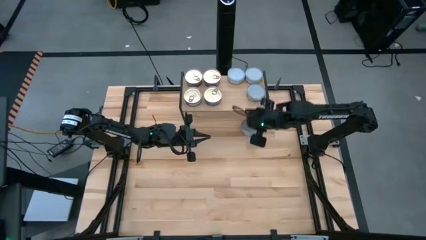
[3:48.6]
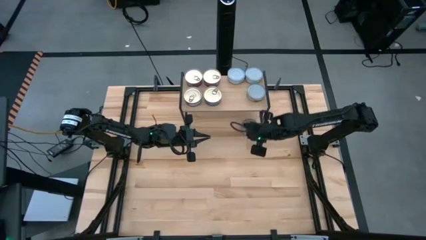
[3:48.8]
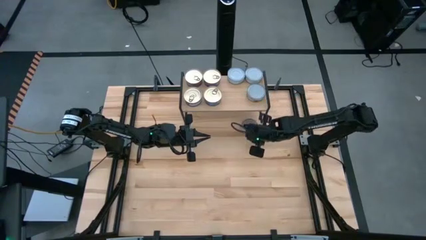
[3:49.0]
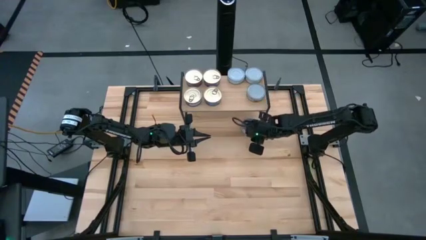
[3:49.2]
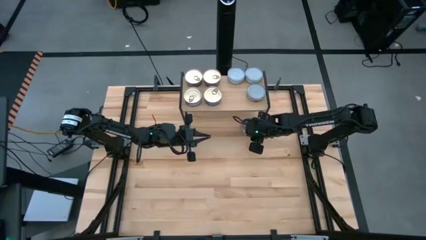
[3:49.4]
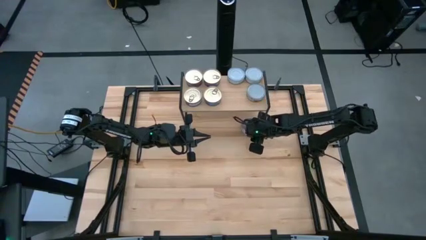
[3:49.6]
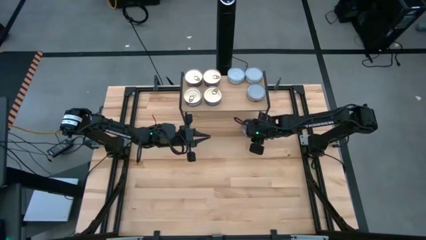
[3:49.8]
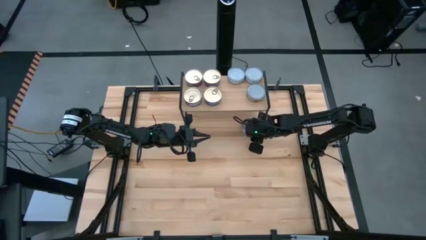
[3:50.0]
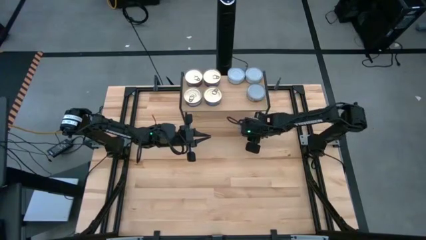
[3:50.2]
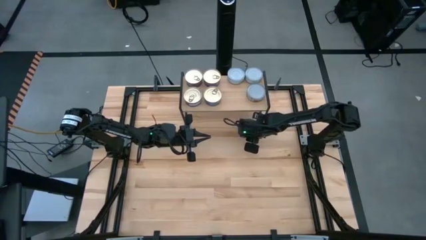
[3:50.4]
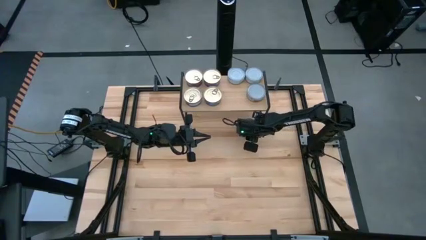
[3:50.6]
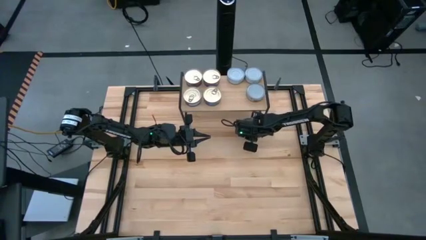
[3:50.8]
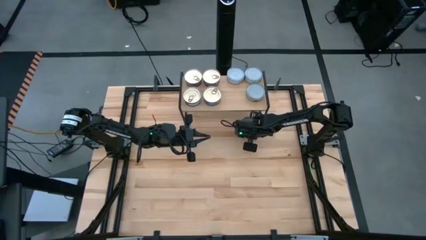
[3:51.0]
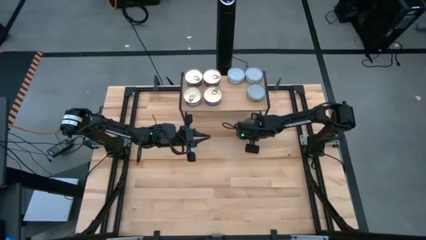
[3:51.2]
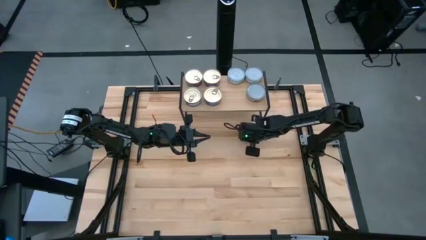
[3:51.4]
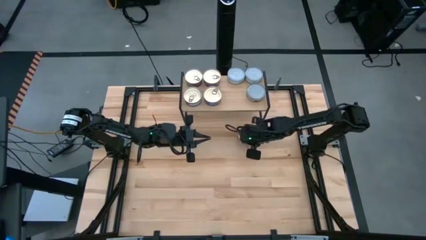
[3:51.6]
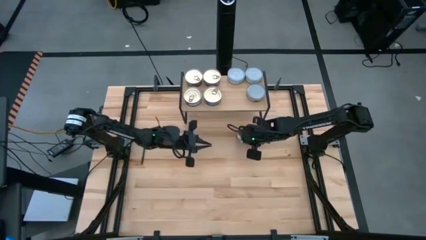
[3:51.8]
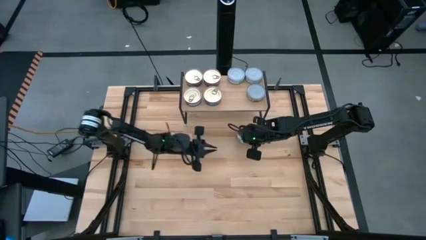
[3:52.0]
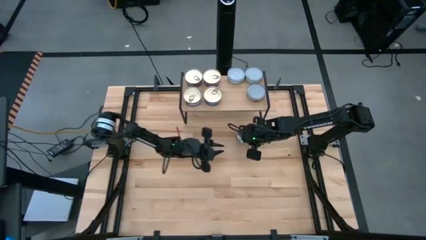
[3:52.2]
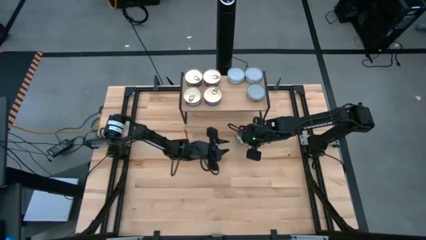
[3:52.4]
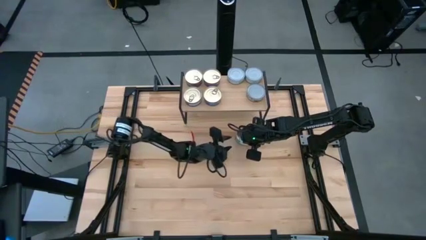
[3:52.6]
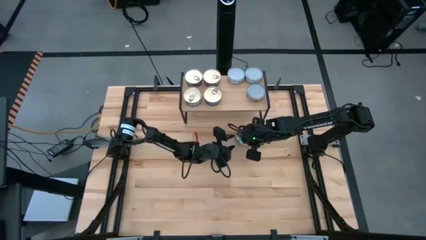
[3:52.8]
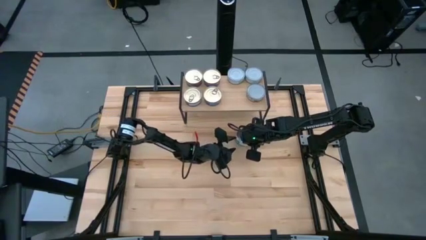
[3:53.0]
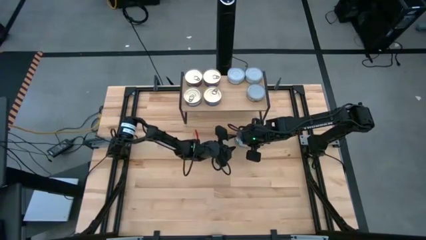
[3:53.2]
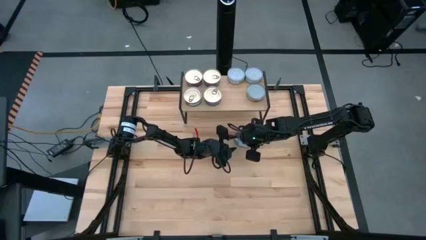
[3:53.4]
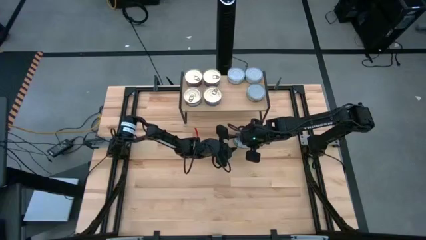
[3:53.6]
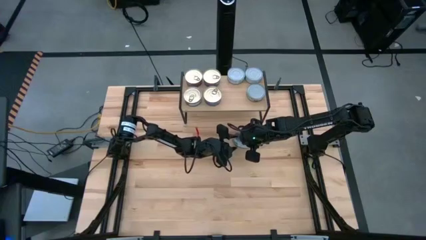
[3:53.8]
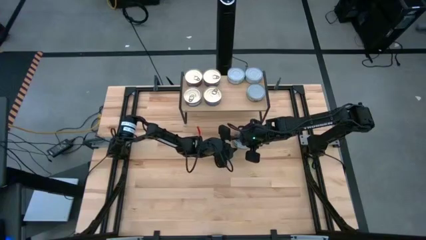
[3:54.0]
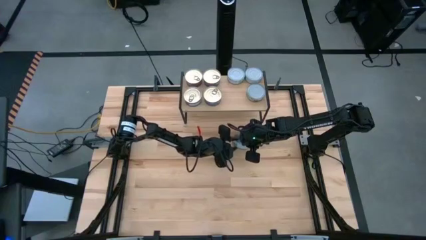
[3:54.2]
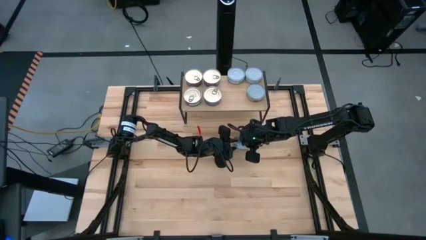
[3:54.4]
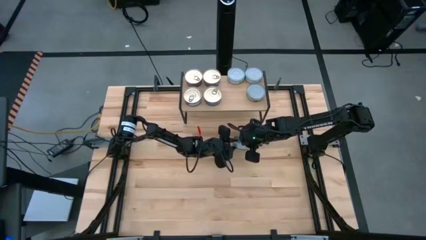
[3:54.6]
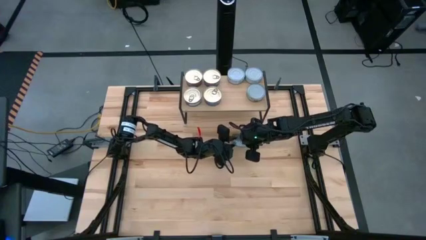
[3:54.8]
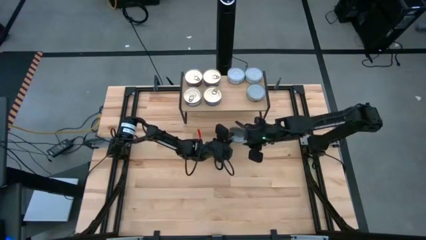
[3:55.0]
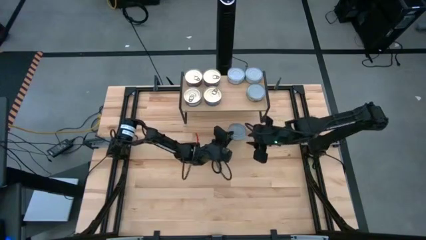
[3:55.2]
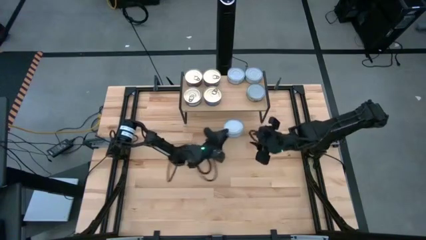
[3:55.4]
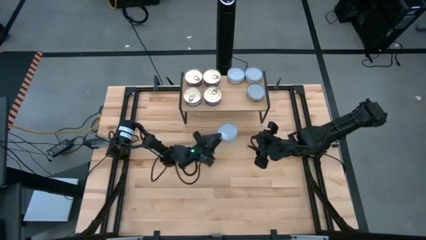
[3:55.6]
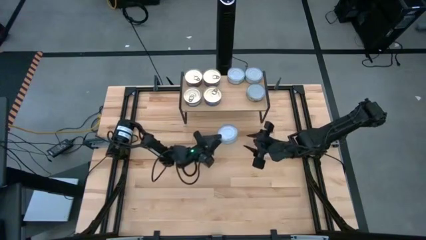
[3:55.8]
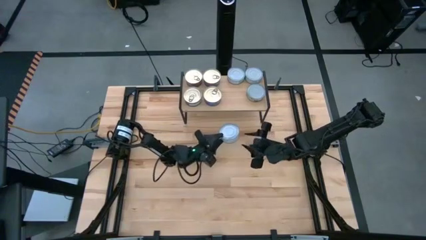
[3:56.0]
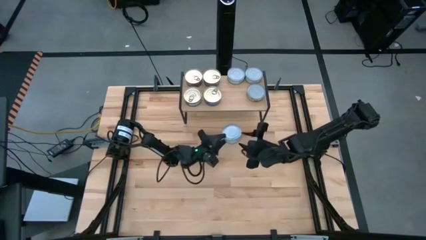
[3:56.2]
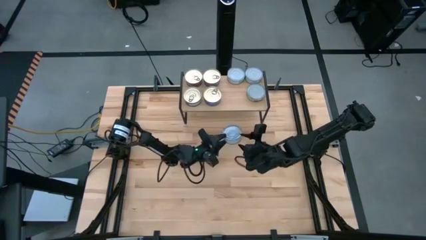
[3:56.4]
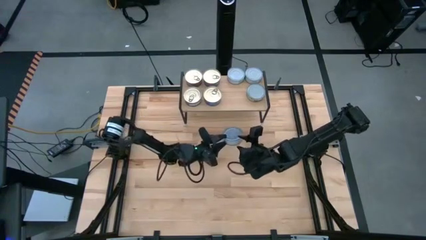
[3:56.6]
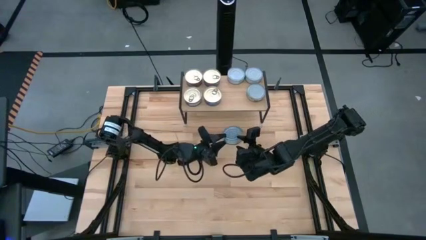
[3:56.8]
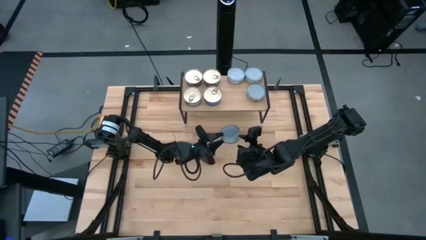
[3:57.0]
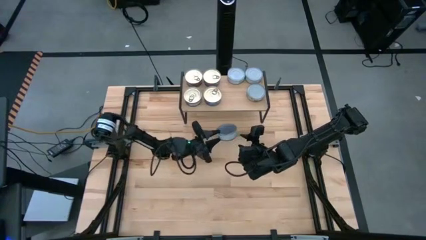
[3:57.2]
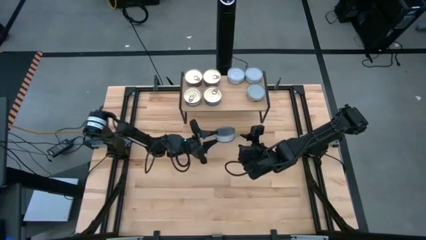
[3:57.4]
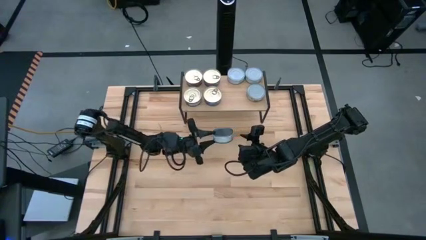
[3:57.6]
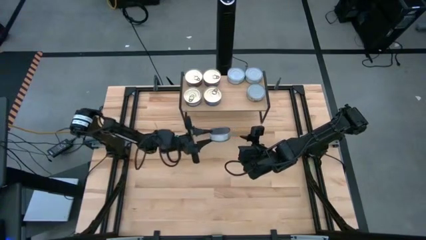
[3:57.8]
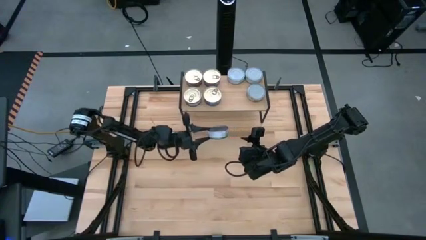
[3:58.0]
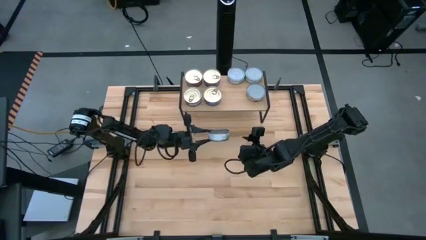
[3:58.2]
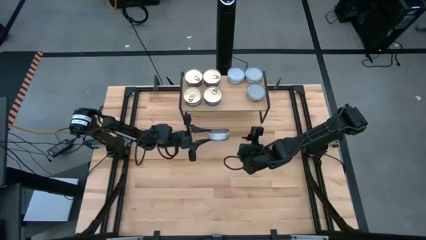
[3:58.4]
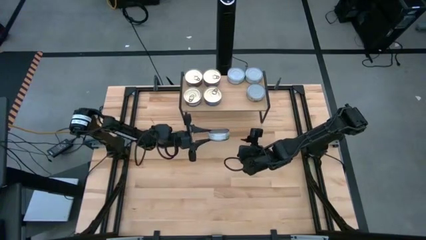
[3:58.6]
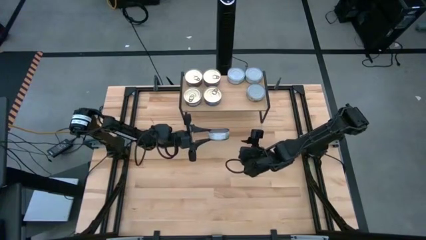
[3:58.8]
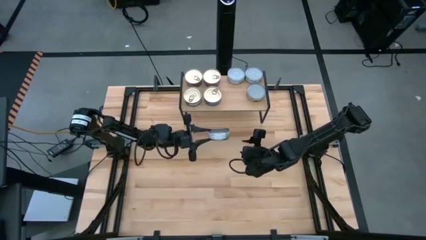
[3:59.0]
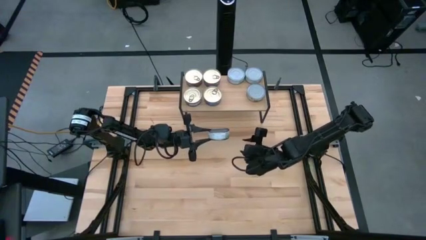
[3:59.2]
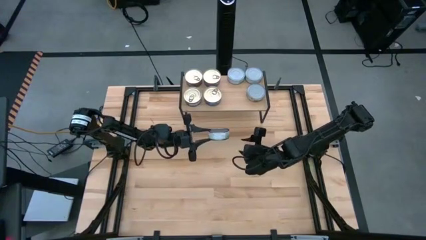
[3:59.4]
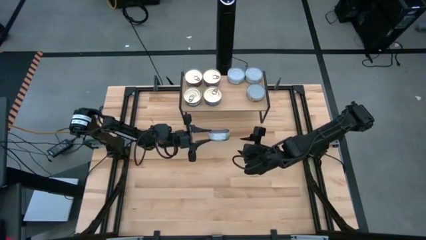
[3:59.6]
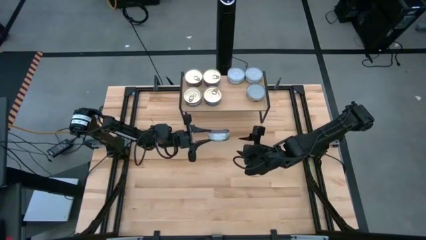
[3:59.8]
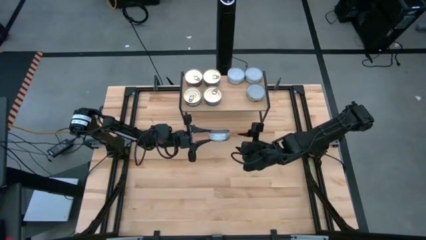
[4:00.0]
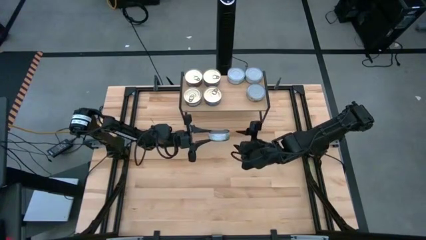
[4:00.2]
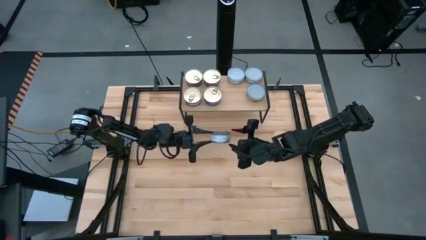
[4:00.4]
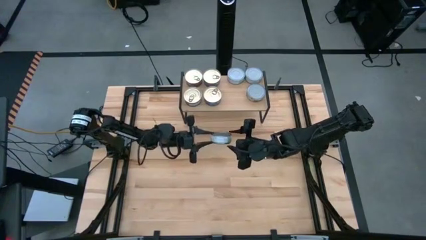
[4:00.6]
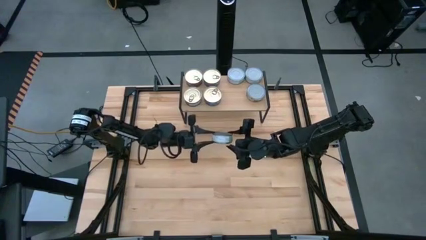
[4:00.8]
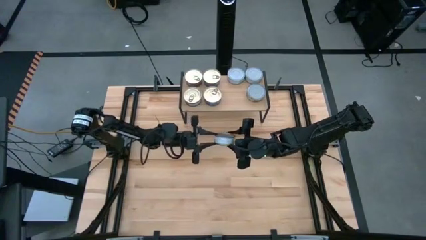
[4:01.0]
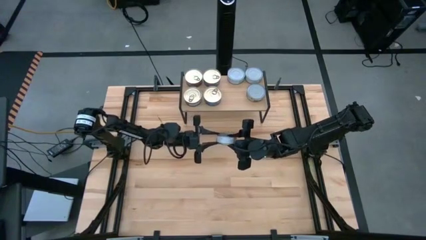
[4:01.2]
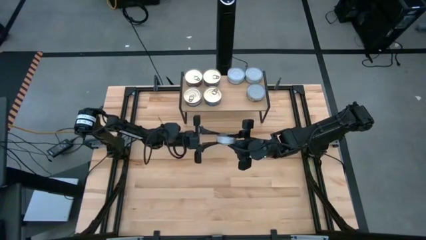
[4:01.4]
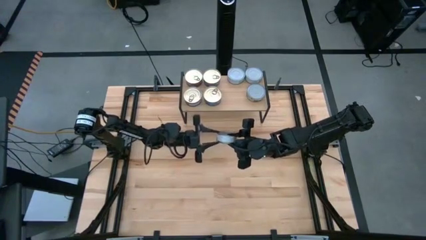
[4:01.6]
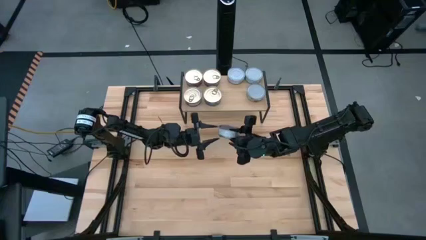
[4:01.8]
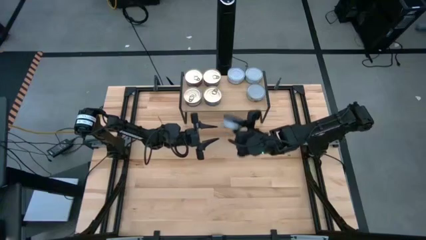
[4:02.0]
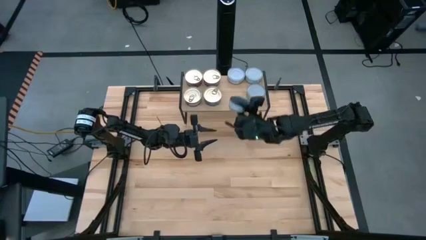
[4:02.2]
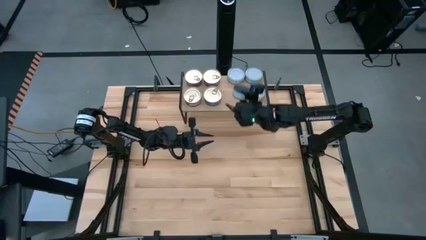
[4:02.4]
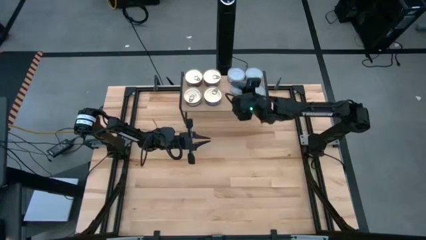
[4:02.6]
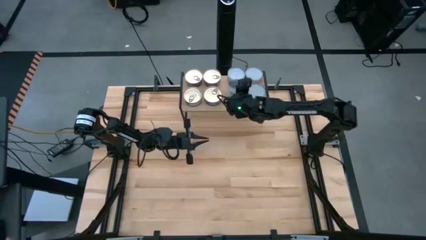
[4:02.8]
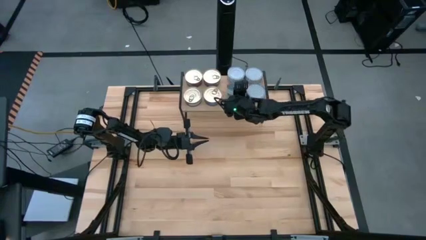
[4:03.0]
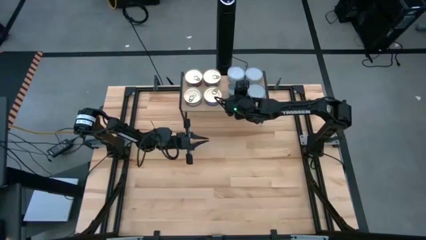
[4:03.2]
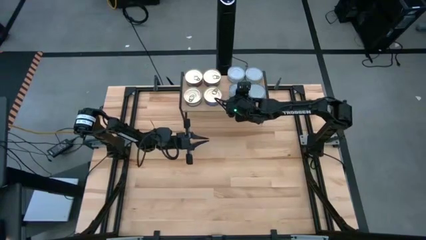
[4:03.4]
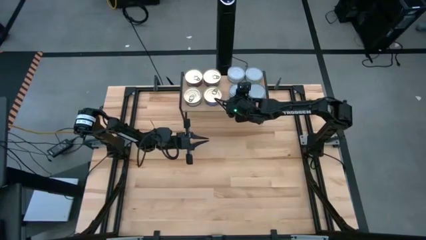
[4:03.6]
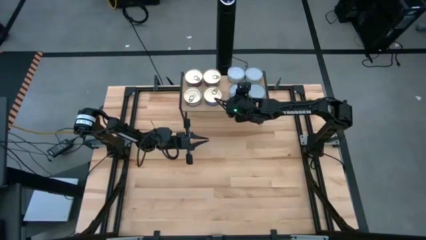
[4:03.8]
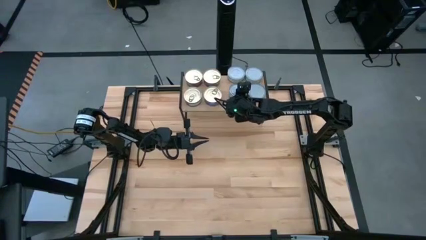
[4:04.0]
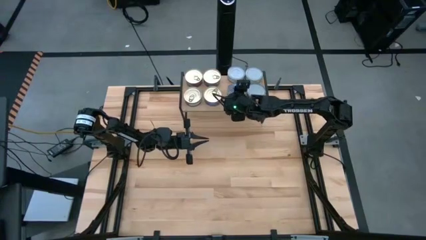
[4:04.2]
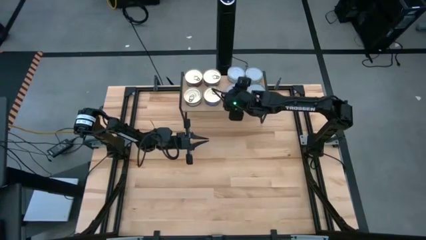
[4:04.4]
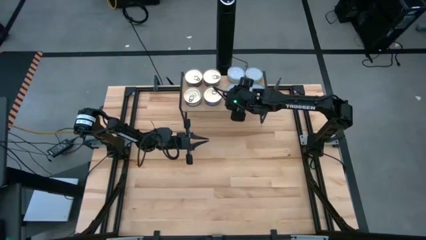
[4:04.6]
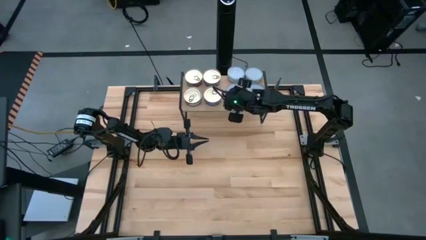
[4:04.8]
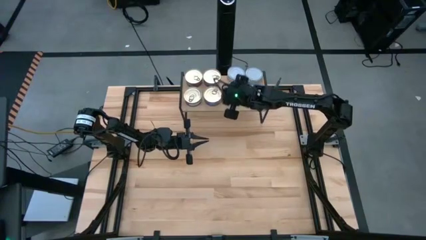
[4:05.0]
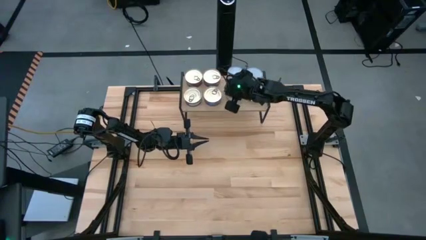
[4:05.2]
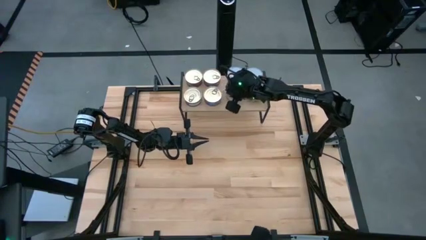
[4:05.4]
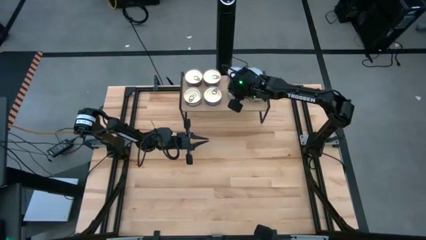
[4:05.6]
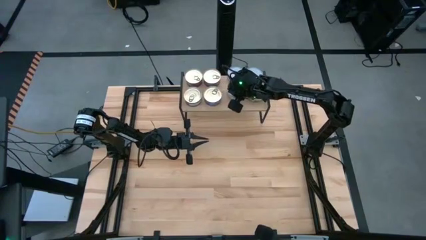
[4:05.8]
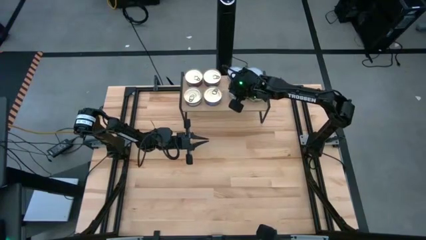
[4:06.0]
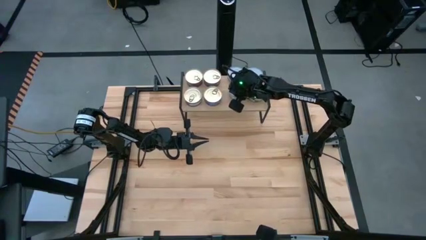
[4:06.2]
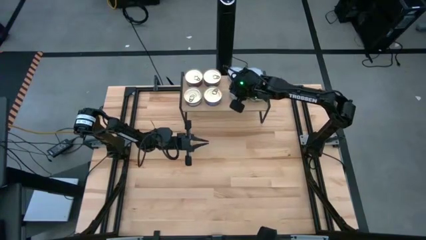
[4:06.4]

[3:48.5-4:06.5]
Task: Stack canned seafood by type on shelf
Put the green tuna can on the shelf aligned with the other green tuna can
